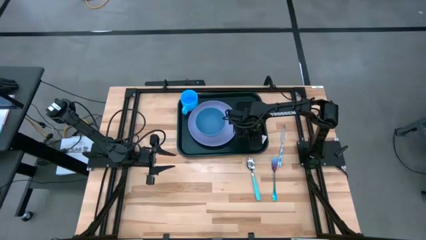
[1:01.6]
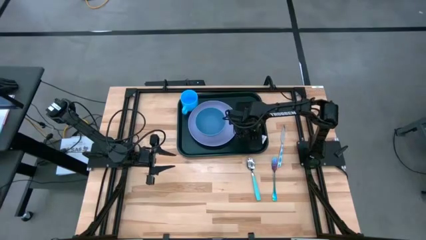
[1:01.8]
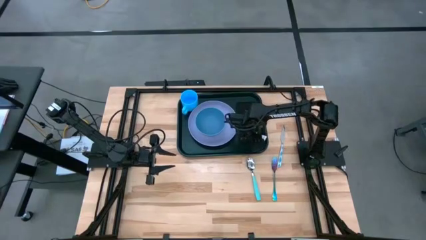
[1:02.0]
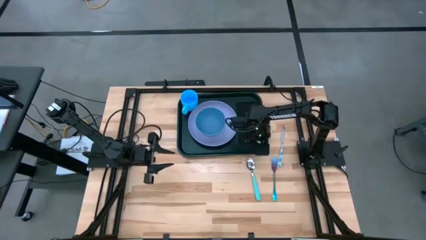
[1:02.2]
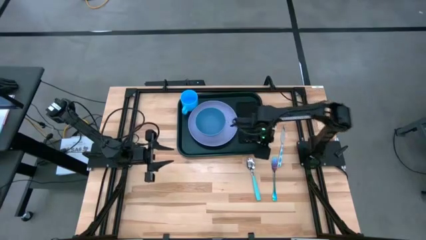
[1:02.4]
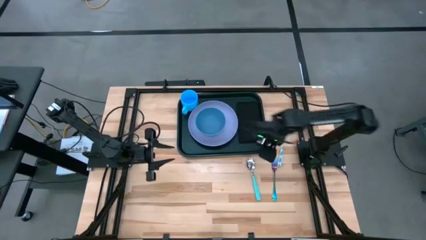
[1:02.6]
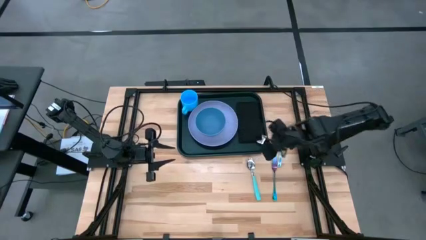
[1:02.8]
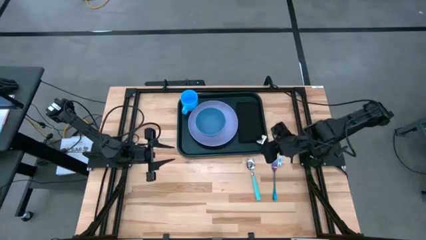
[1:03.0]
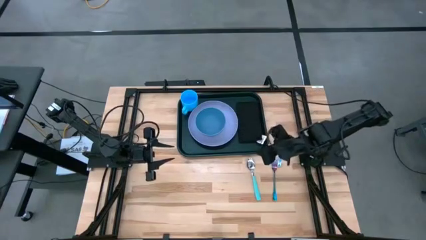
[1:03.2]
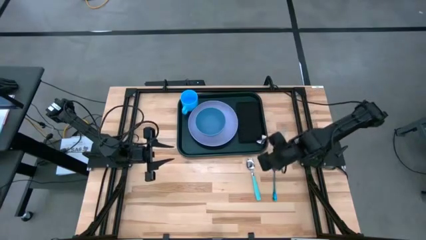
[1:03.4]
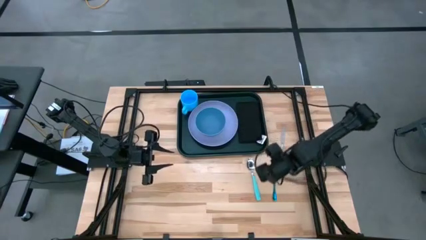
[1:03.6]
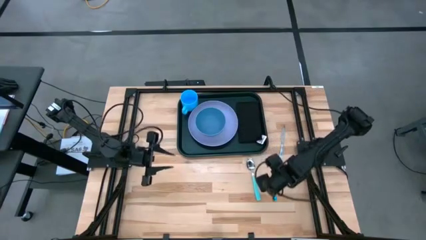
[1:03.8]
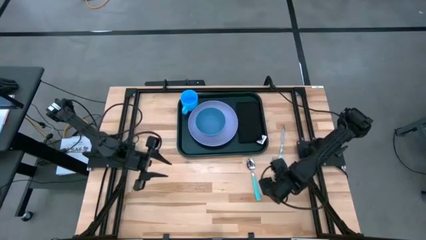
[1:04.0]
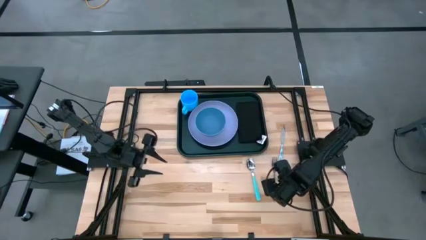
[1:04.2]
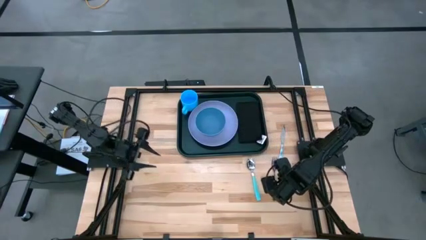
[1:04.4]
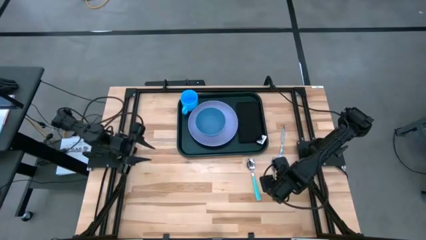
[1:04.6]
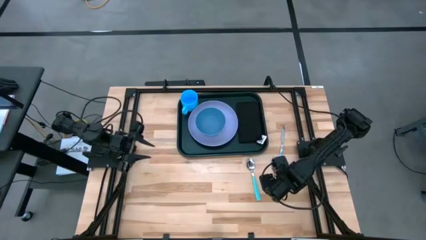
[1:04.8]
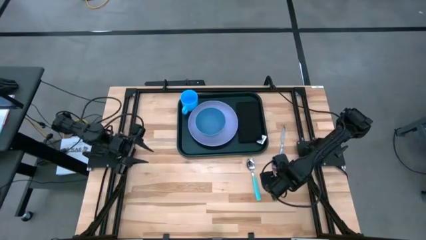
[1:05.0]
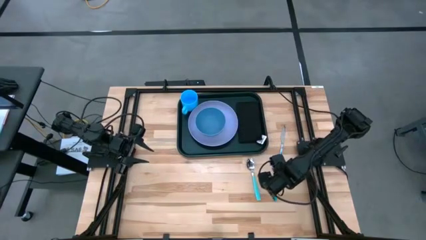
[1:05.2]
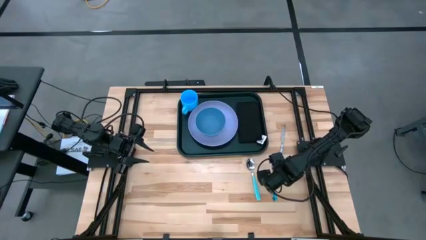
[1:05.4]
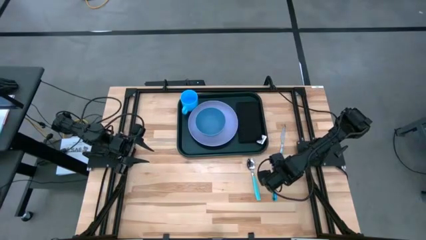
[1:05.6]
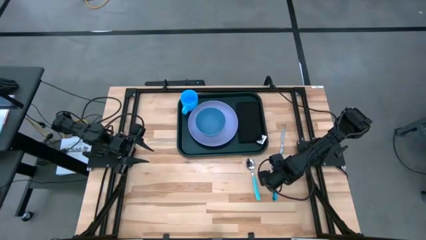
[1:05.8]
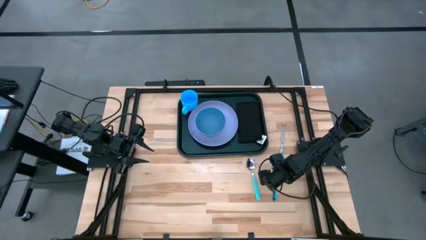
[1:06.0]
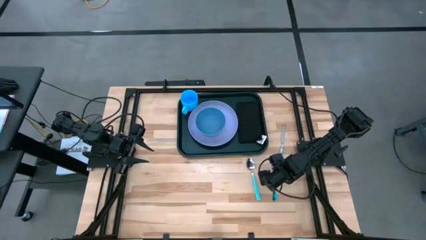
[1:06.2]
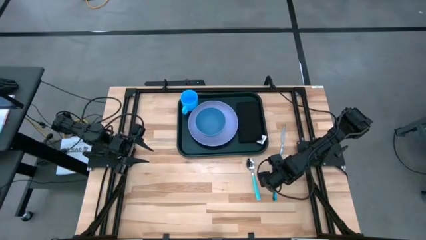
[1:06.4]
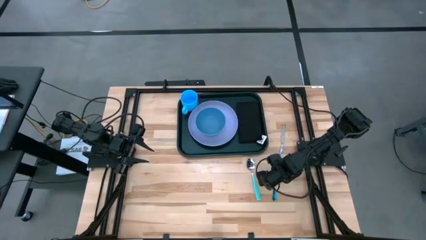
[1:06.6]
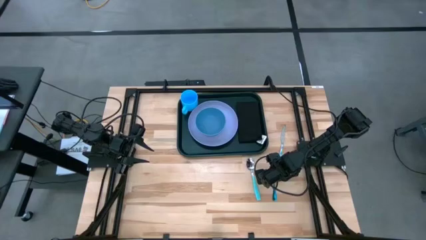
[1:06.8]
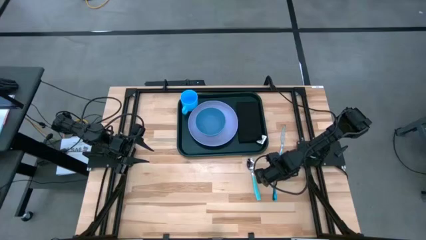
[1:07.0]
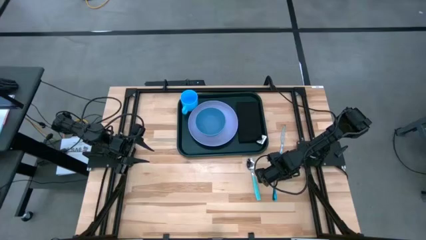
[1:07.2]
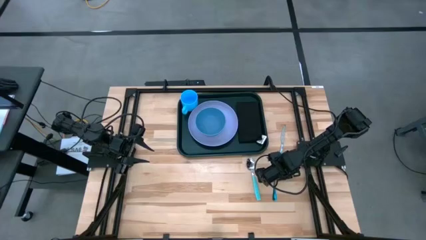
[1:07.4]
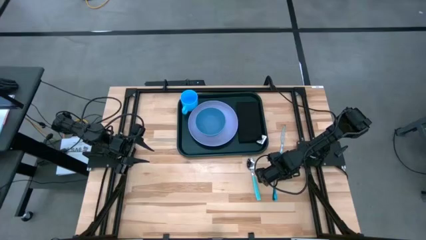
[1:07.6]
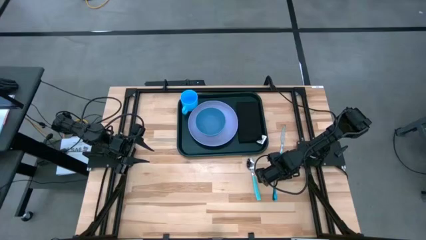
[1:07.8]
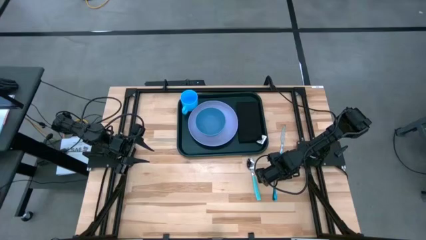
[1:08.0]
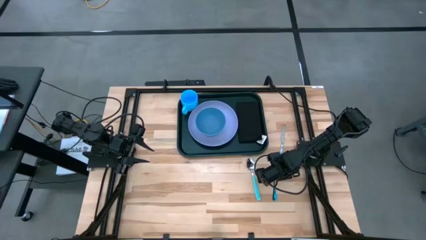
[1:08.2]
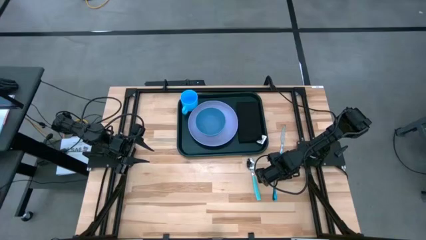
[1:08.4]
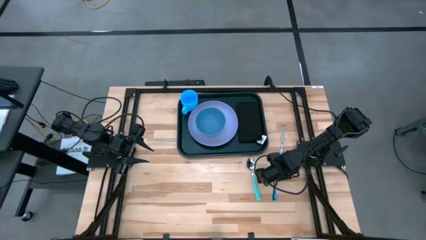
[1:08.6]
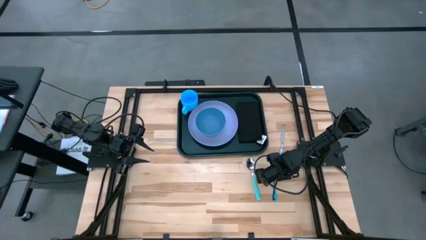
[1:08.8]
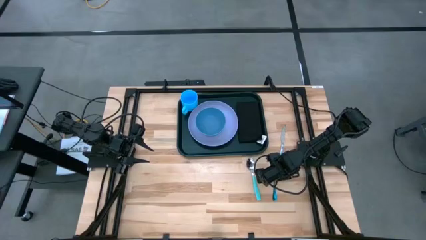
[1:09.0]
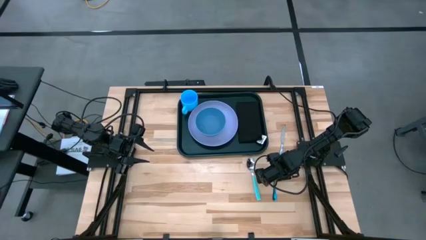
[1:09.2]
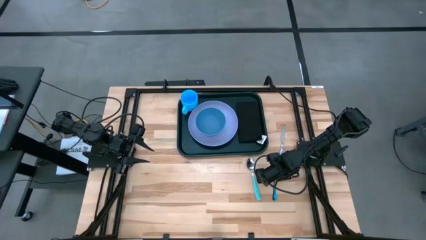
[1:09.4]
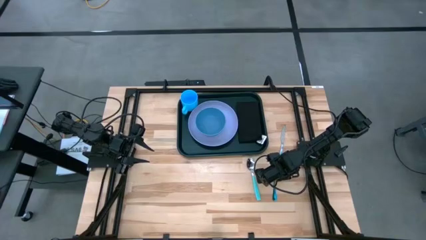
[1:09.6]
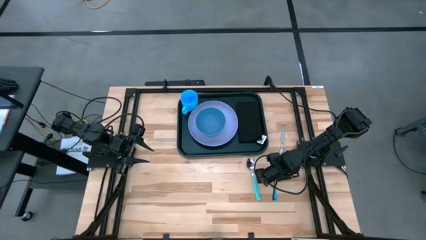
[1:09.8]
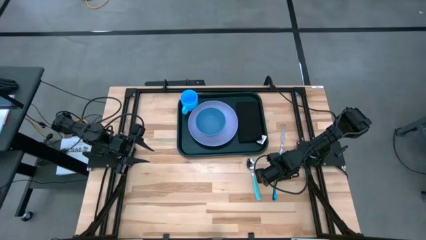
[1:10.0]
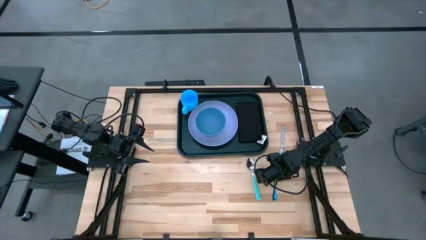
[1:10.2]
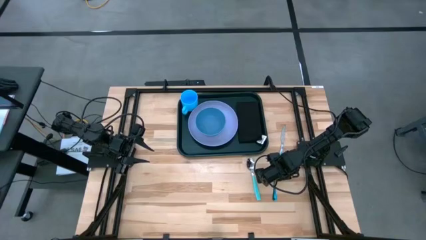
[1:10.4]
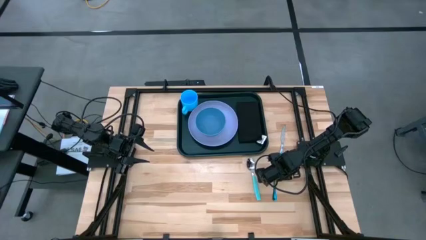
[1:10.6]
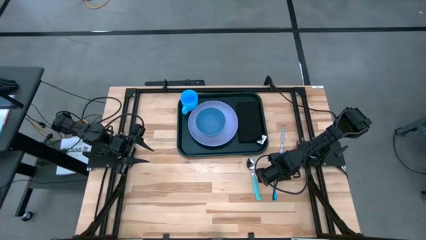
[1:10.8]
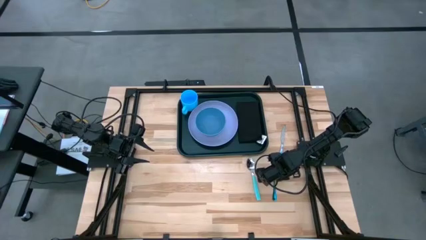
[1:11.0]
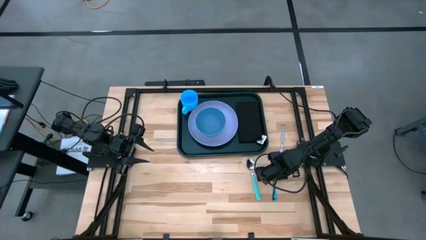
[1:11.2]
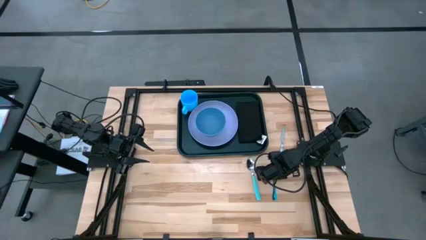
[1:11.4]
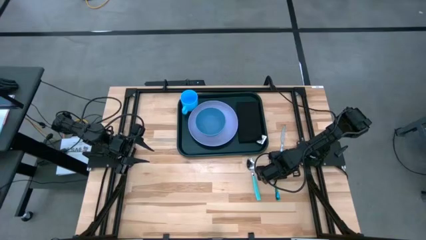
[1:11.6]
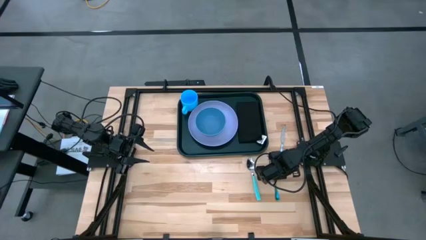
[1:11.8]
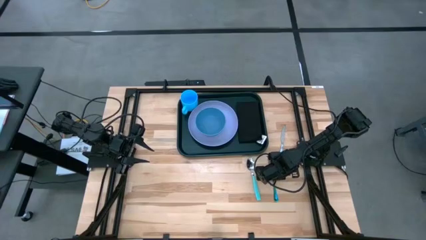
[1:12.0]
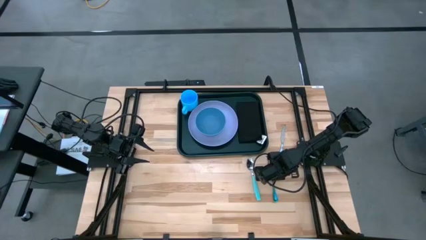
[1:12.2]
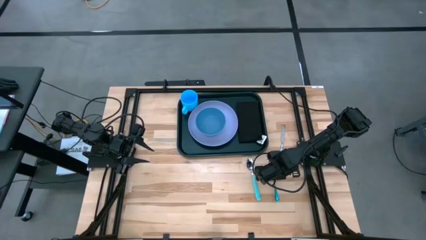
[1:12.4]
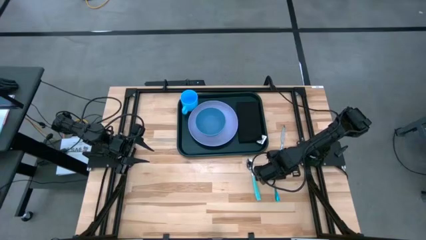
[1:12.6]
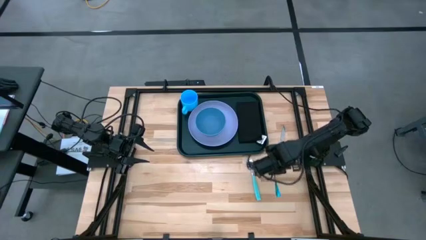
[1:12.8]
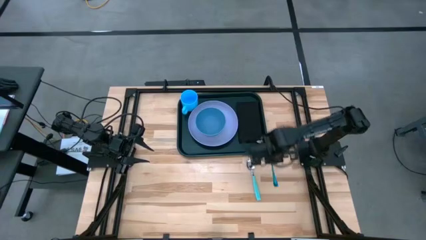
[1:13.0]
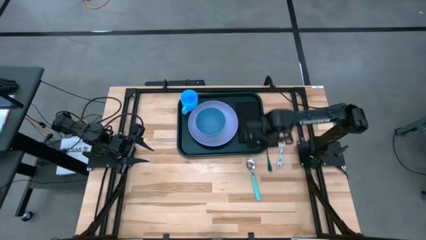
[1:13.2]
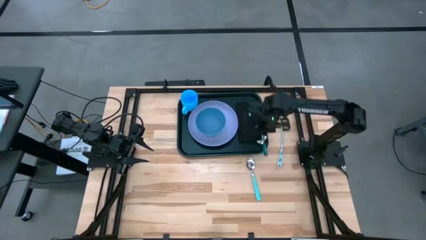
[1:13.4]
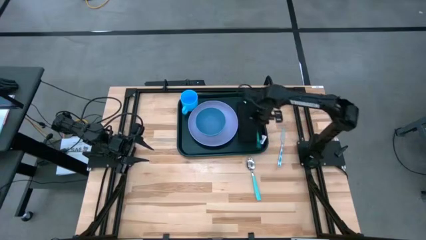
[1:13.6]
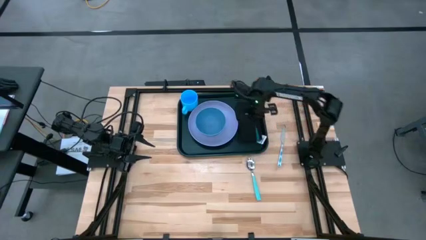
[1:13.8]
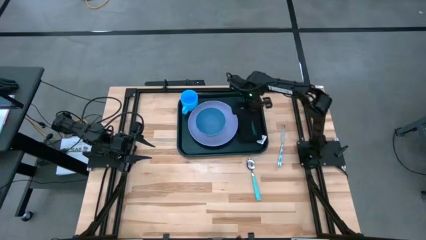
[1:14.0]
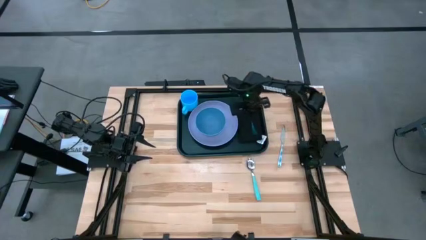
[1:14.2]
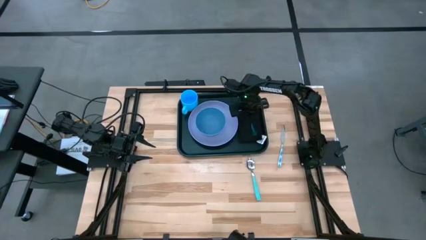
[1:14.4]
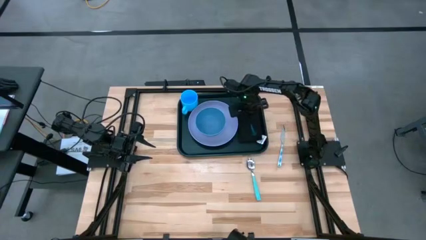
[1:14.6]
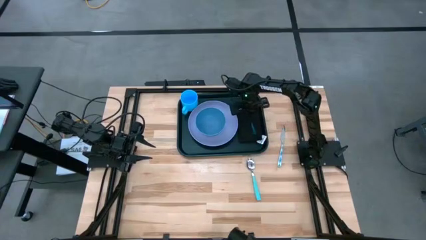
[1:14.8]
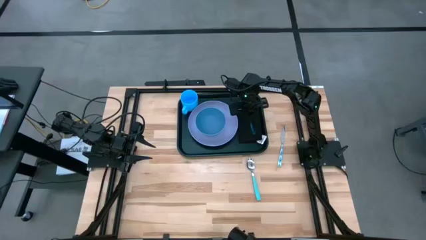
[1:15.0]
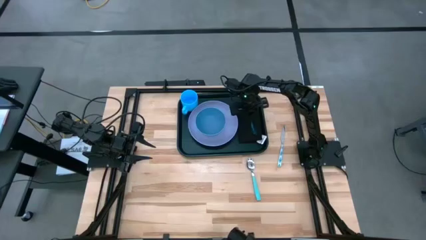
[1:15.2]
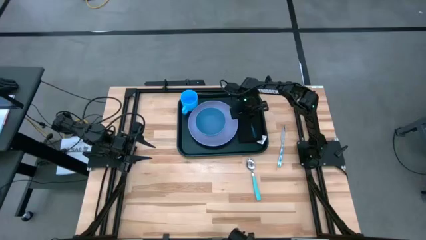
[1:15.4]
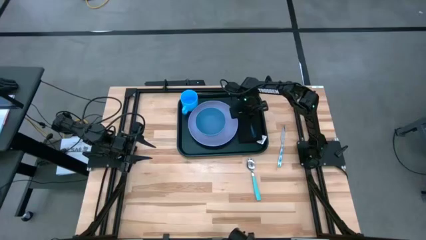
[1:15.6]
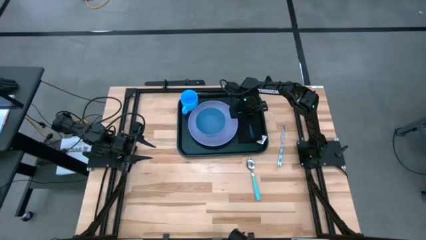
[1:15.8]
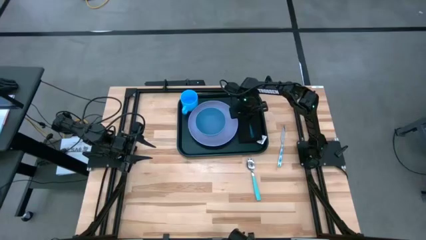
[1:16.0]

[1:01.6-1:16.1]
Task: Set up tray
Put the purple fork on the black table napkin

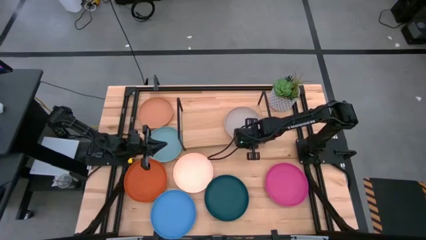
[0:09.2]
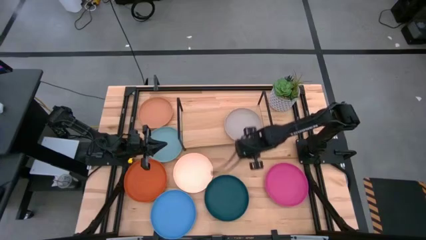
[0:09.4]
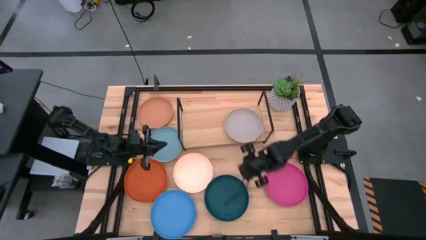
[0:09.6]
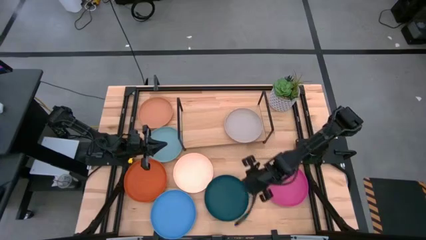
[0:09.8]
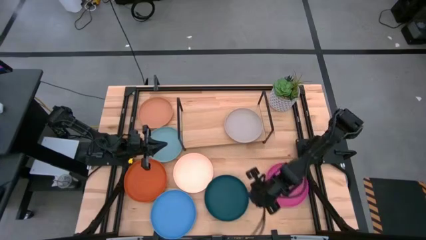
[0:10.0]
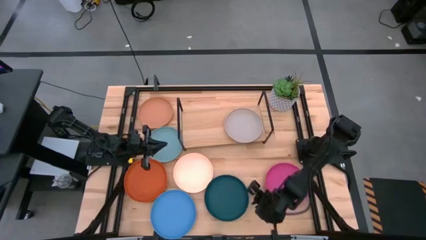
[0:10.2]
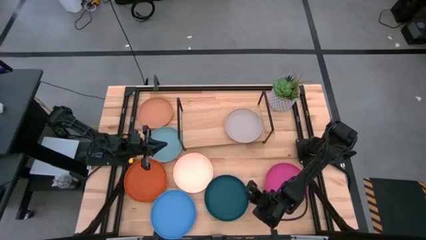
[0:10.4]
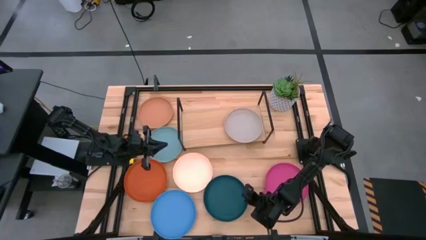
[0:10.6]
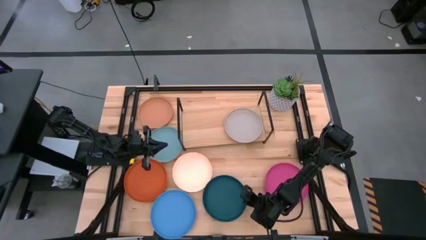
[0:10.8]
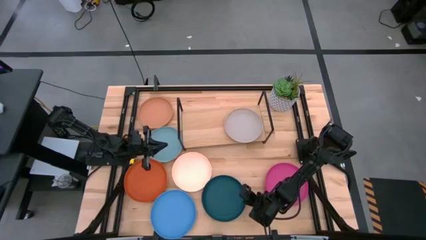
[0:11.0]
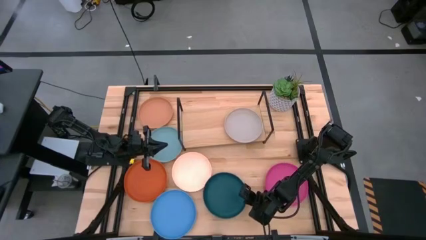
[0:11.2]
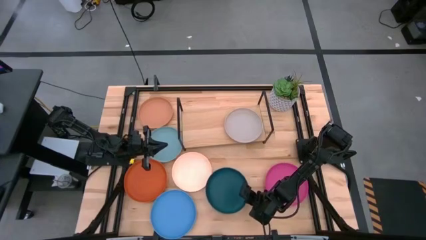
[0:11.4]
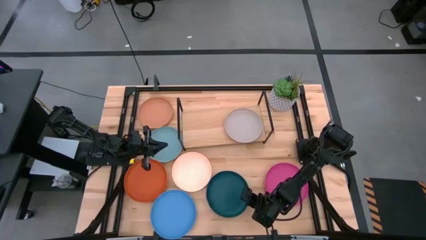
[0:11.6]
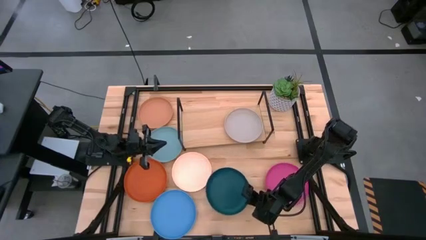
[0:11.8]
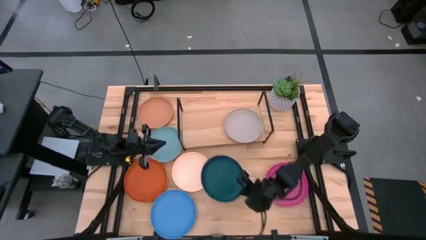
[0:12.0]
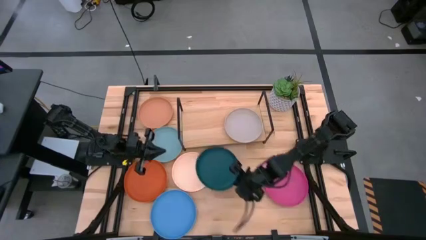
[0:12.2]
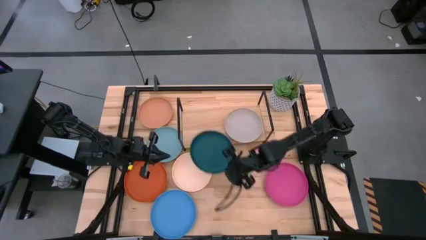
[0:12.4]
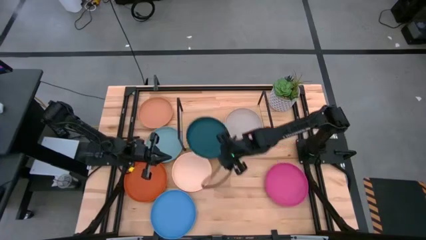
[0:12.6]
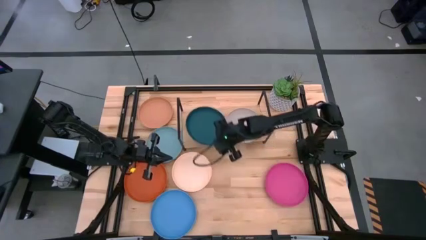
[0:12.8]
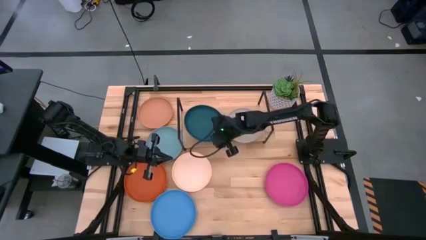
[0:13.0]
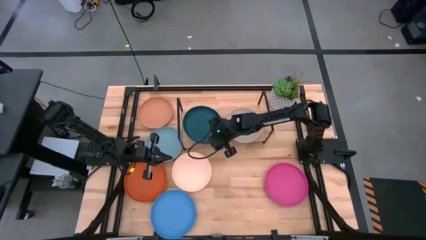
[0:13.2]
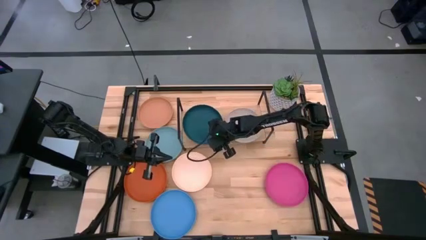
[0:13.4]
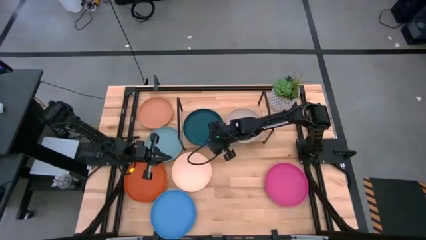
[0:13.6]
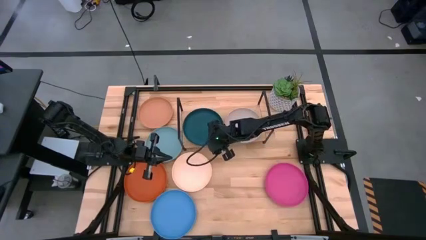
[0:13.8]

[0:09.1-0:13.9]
Task: Place and stack plates onto a shelf
Put the dark green plate on the shelf
